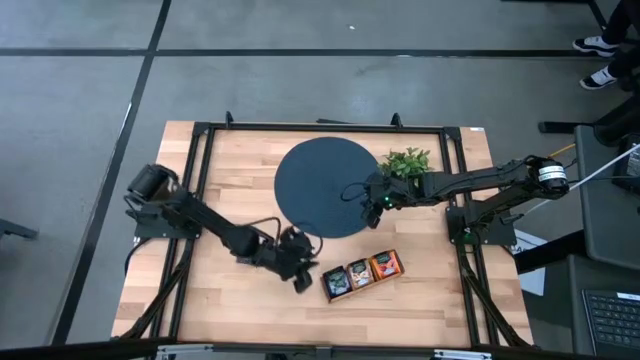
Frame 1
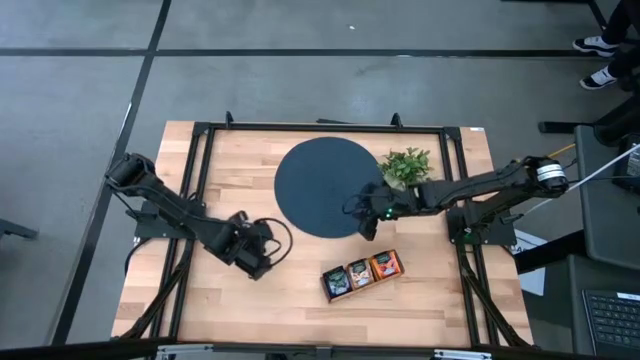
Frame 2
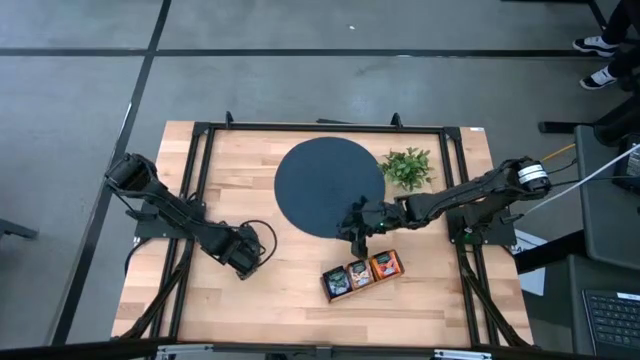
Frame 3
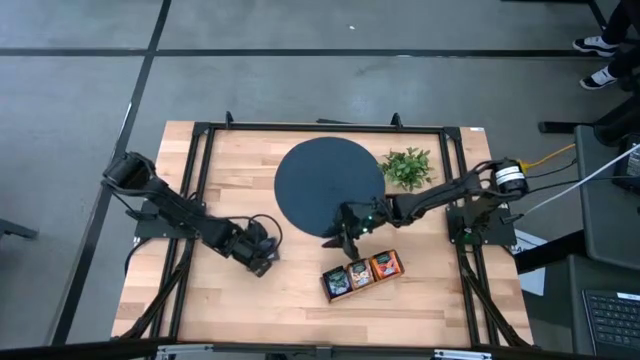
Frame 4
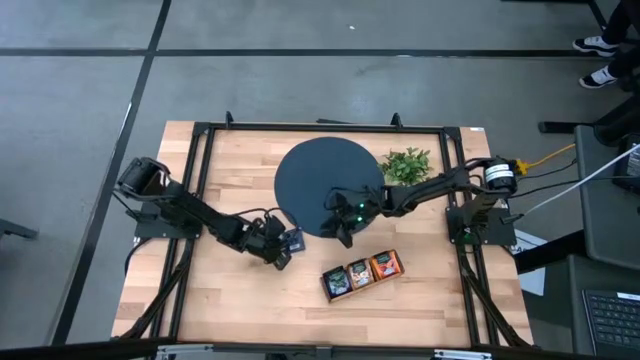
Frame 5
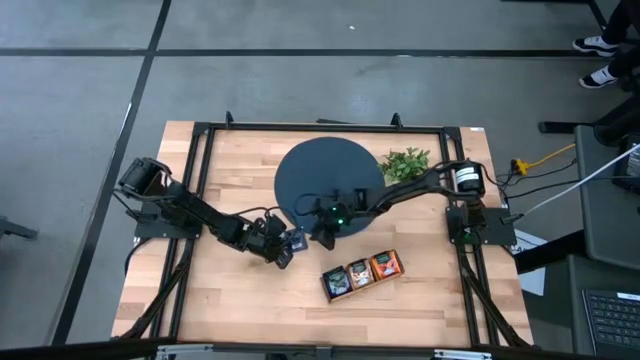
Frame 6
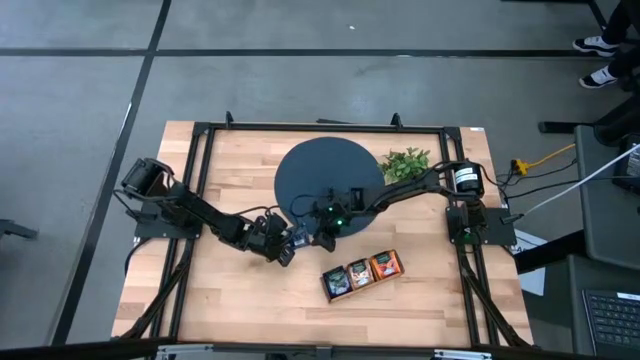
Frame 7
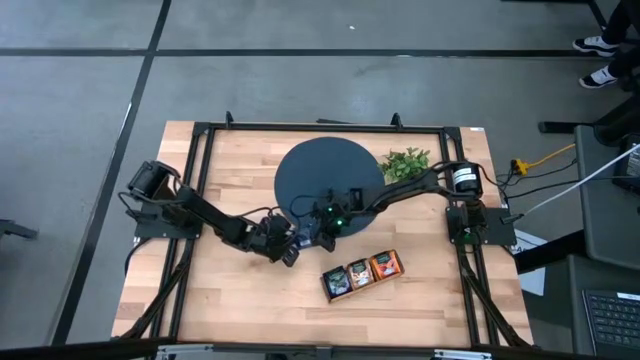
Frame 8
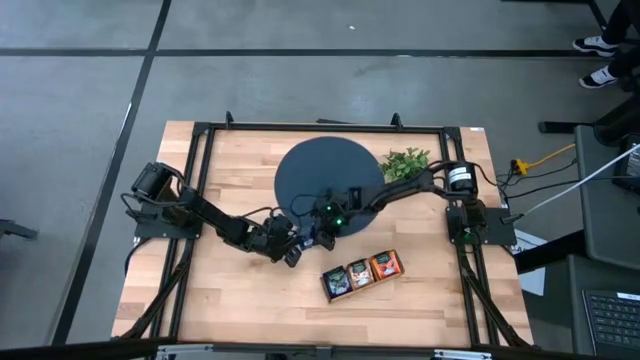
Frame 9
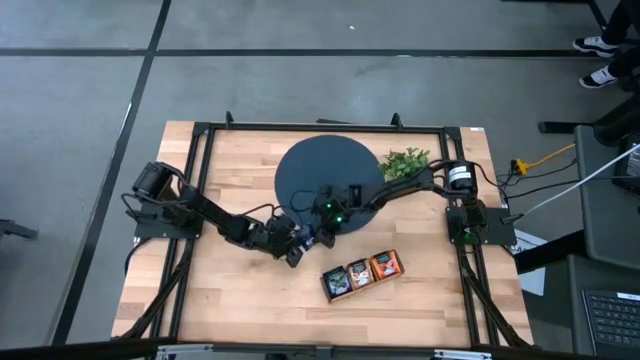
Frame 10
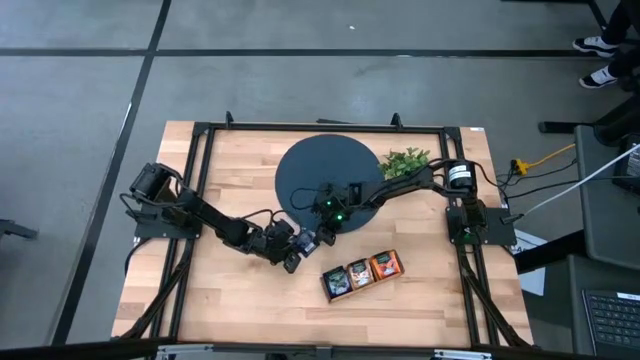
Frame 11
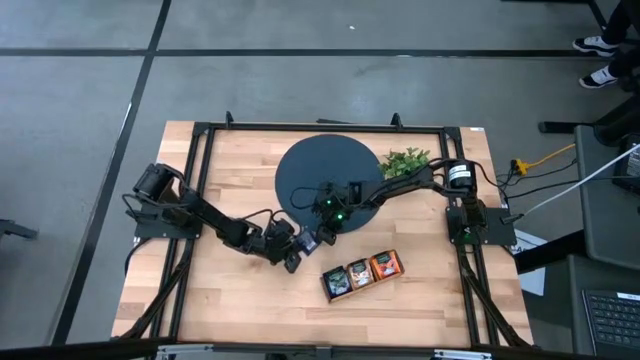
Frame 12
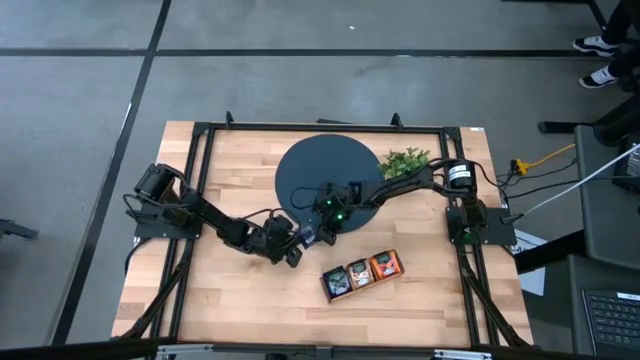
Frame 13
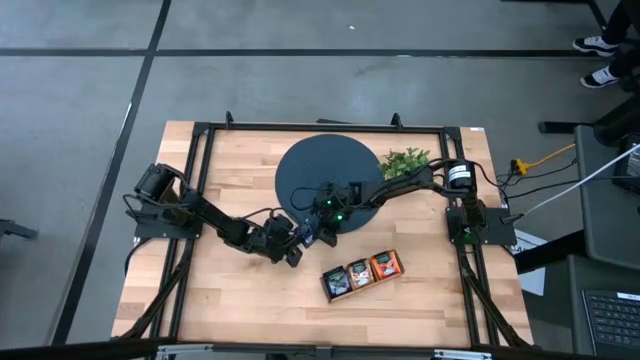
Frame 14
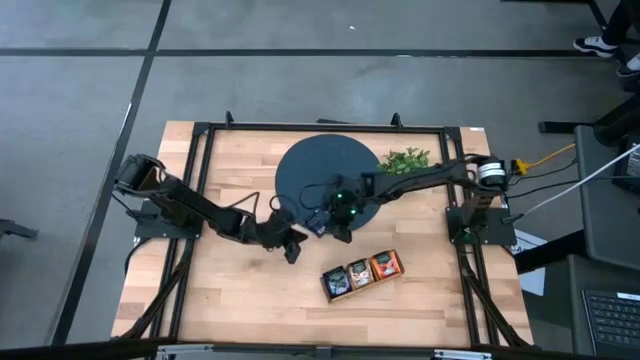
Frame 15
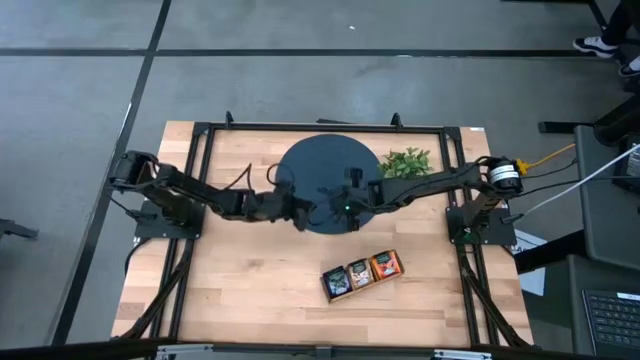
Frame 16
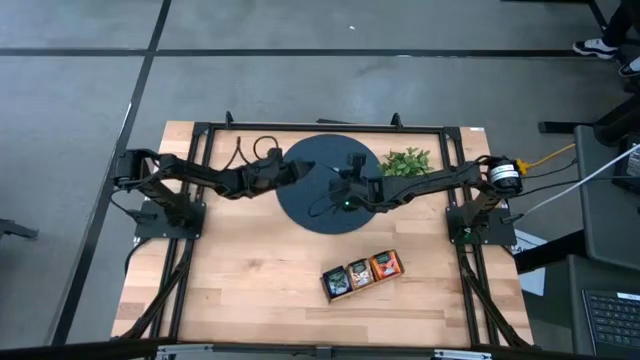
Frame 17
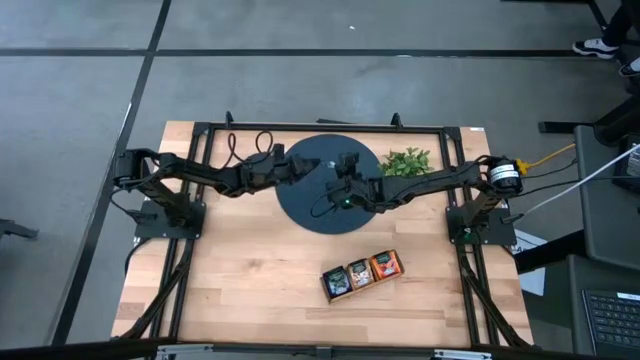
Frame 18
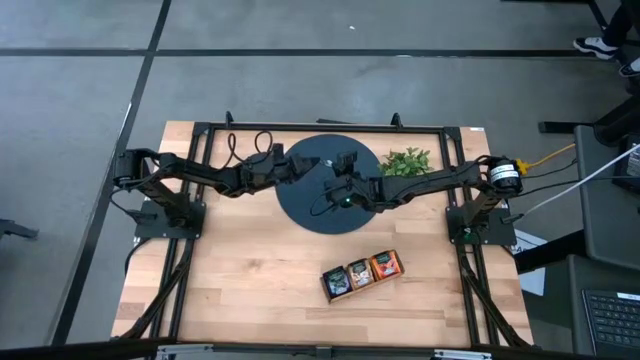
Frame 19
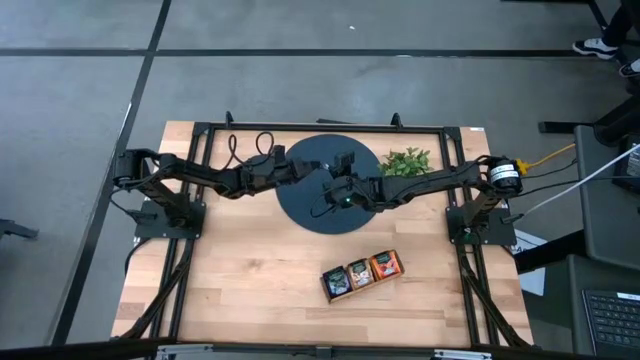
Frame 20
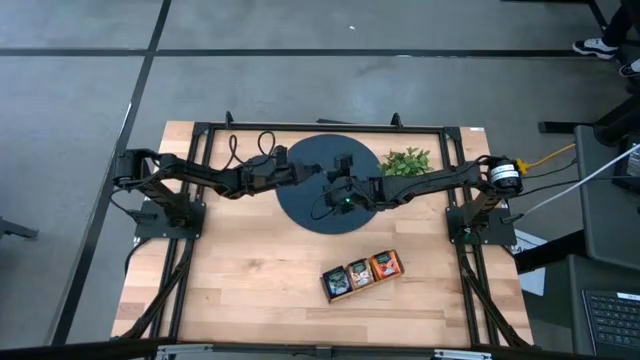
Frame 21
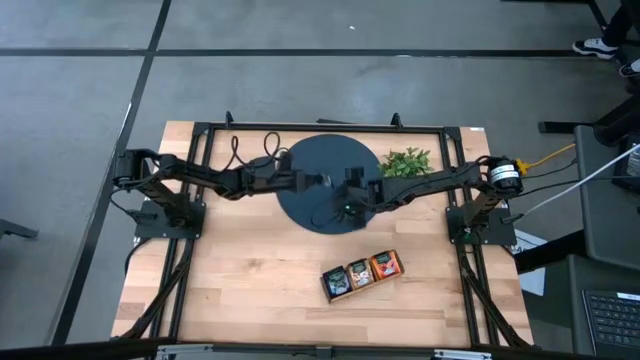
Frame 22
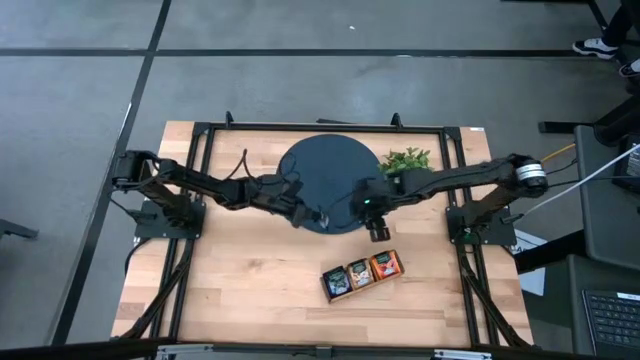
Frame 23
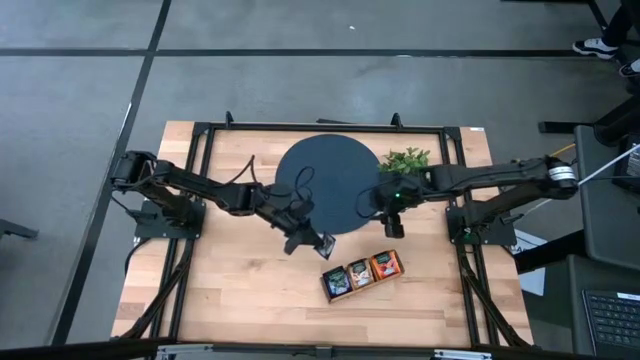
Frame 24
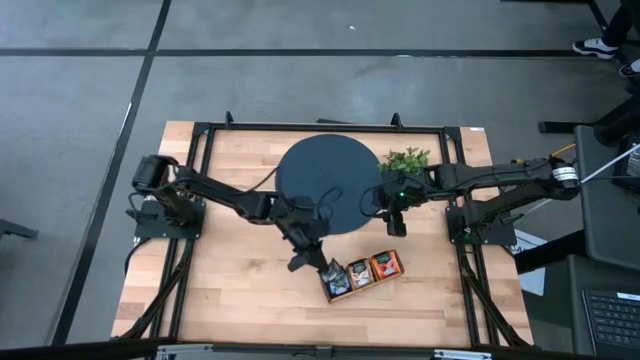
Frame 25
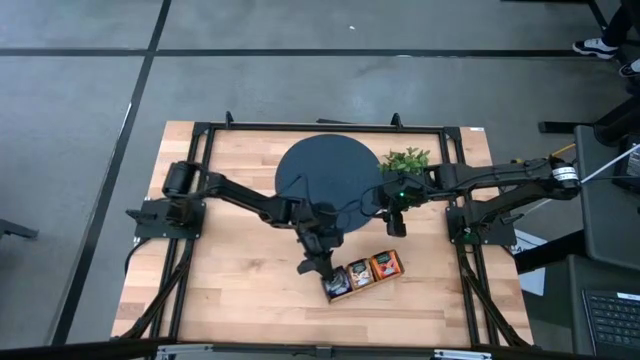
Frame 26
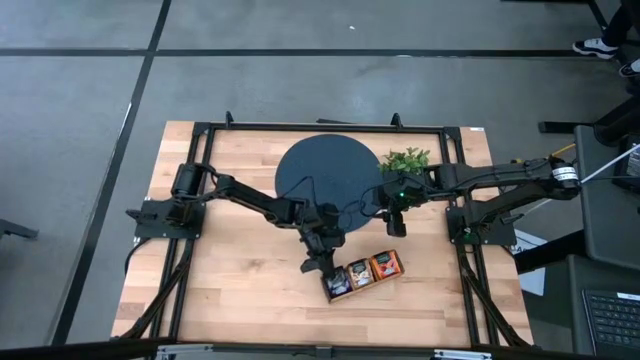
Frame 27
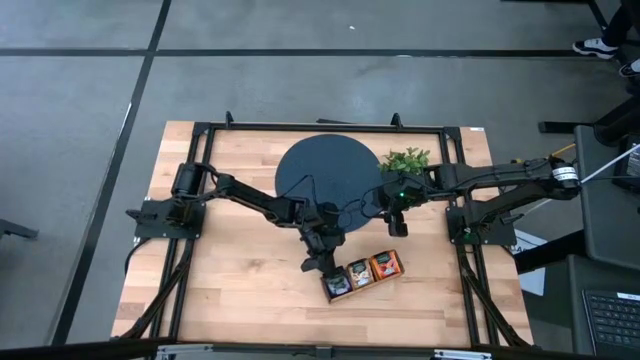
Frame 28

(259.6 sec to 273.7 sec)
Task: Pick & Place Tea
Put the purple tea bag into the left section of the wooden organizer

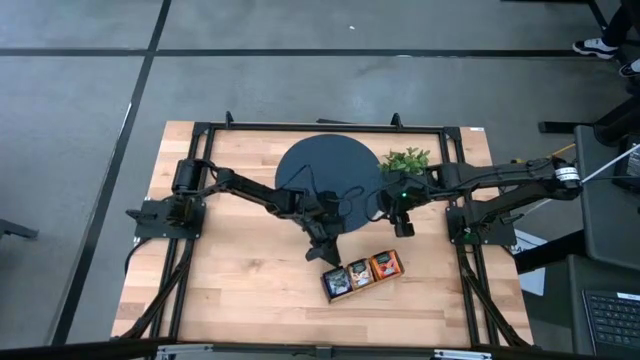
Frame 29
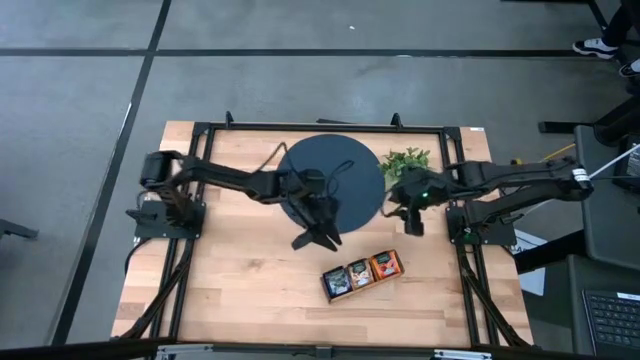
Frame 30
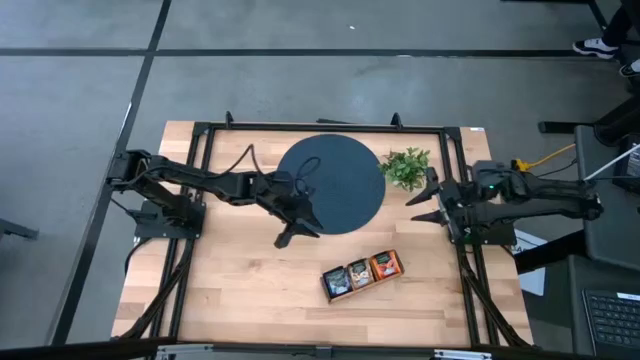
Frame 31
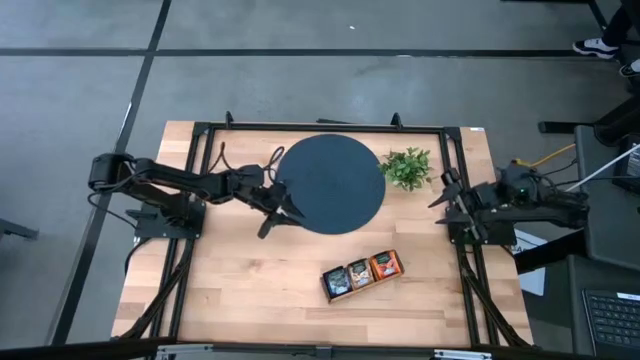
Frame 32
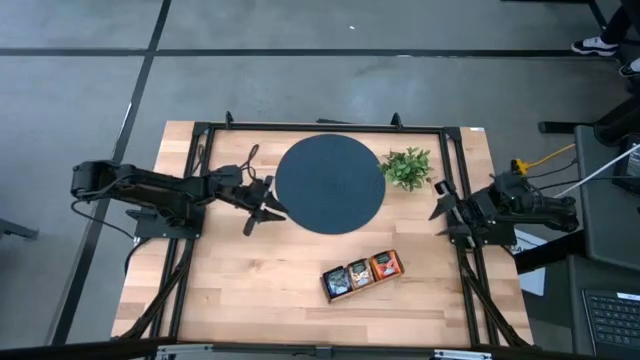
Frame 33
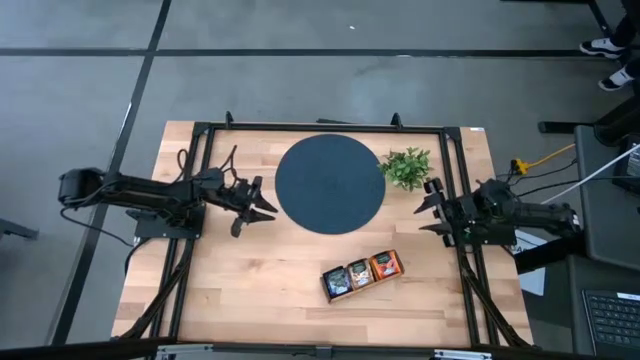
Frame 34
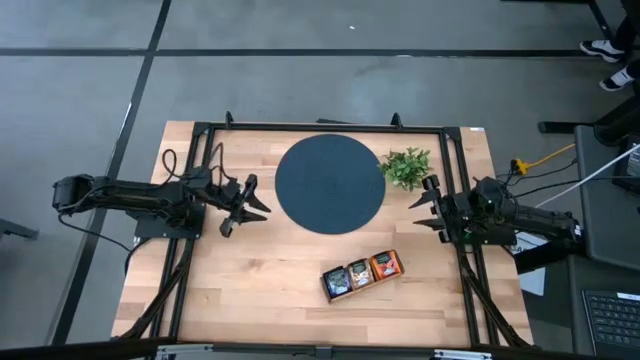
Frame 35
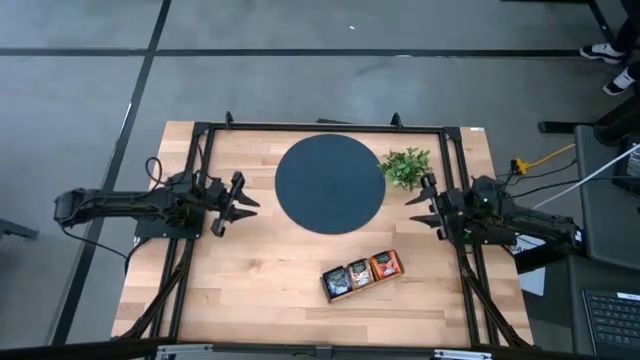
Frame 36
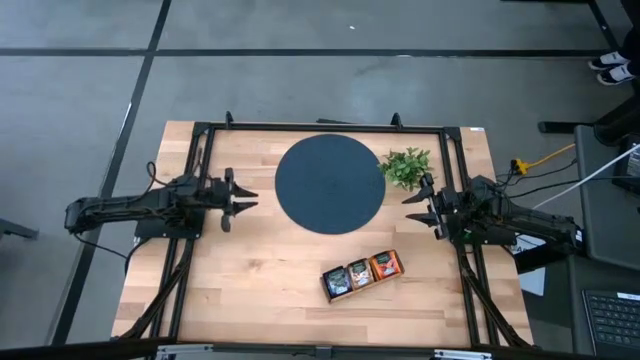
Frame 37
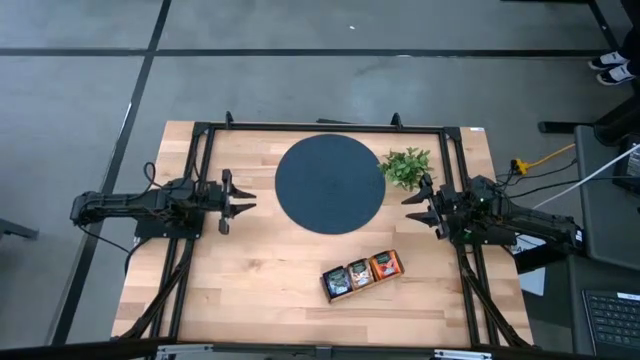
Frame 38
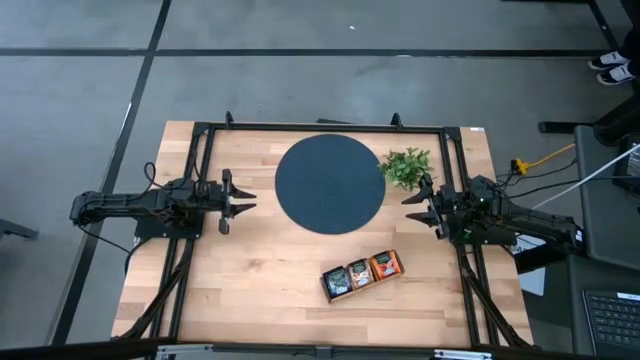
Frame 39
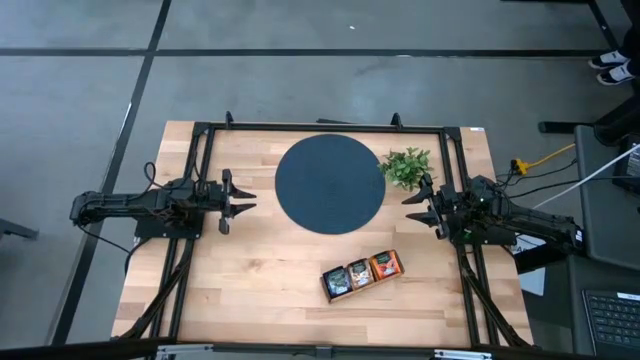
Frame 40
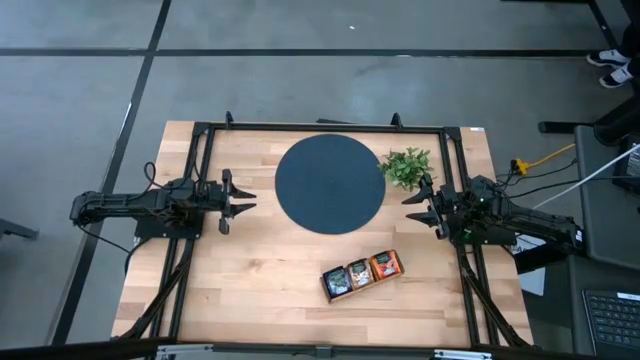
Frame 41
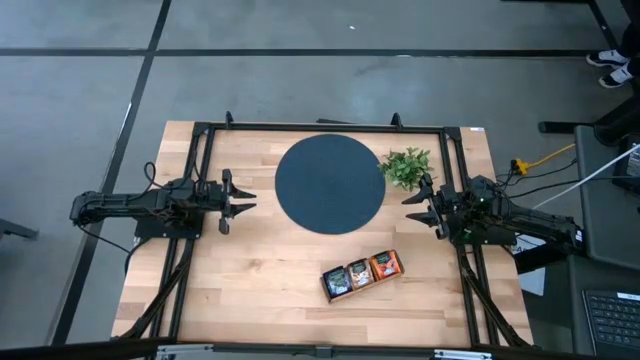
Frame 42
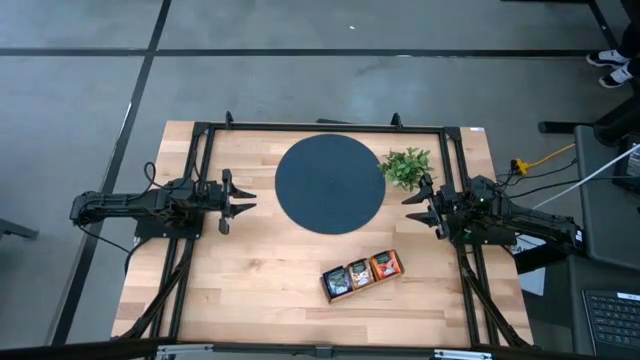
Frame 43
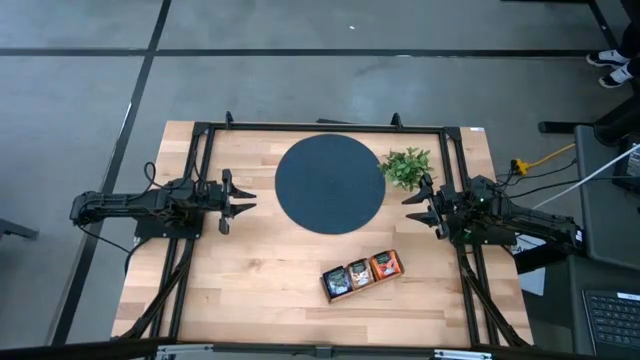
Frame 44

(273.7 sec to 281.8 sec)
Return to Home Position
